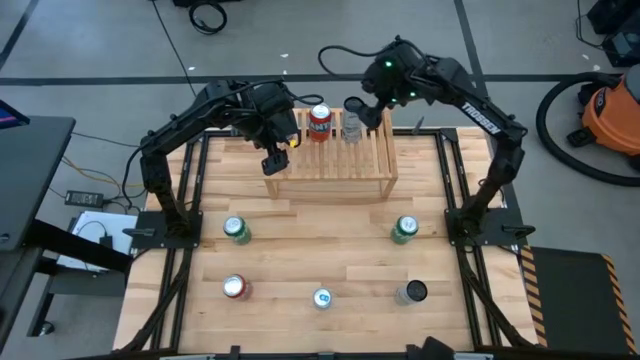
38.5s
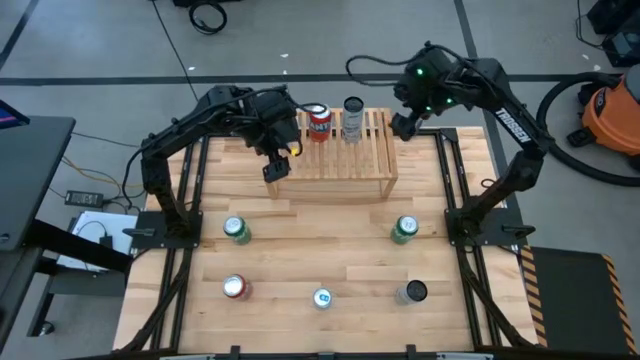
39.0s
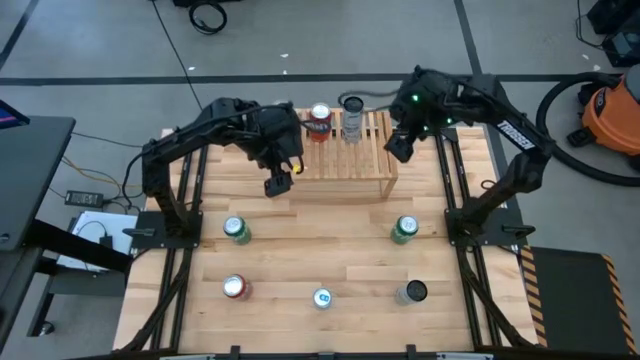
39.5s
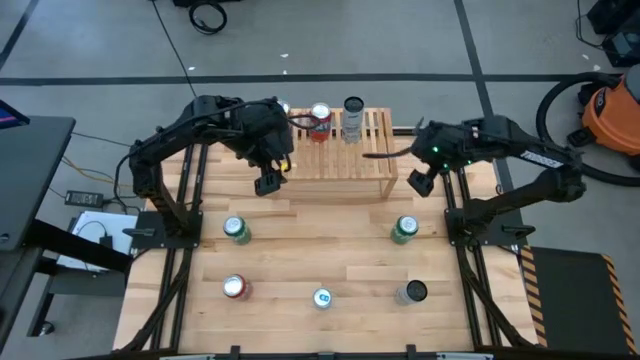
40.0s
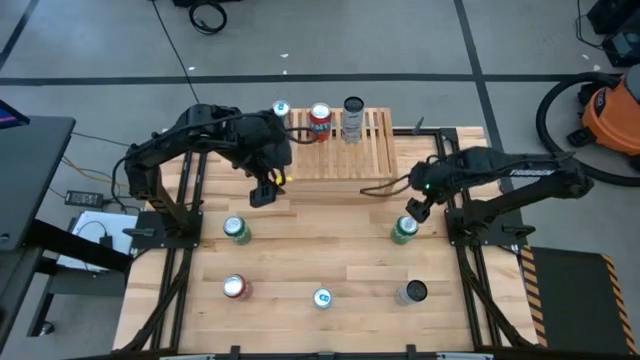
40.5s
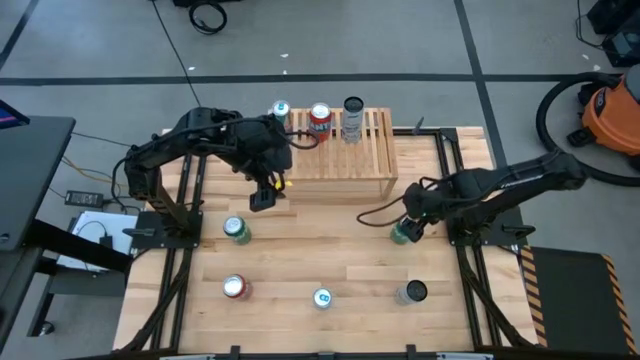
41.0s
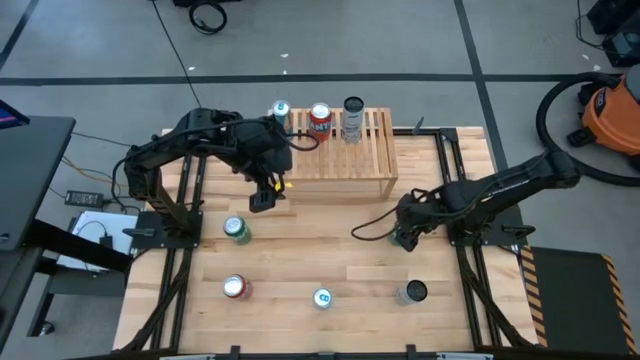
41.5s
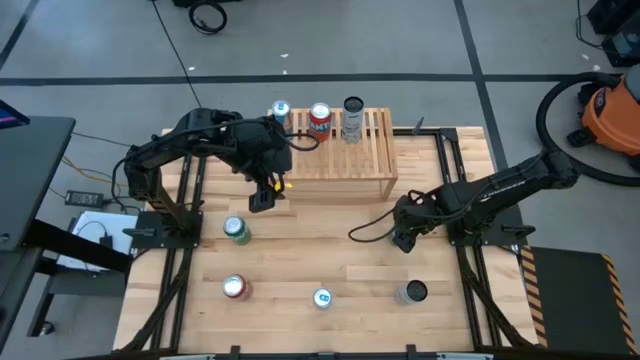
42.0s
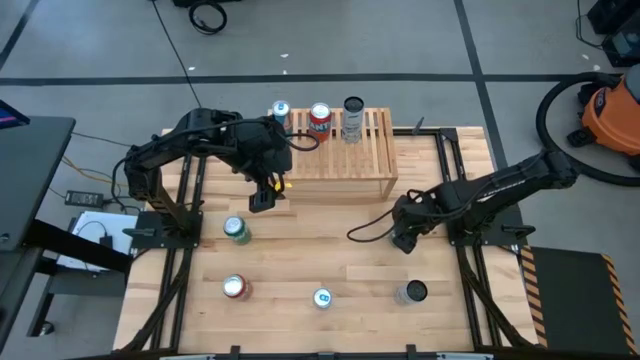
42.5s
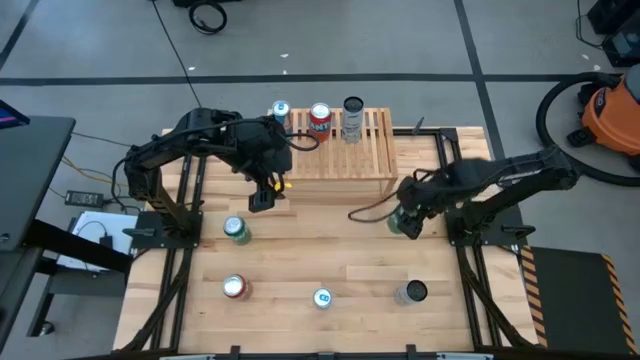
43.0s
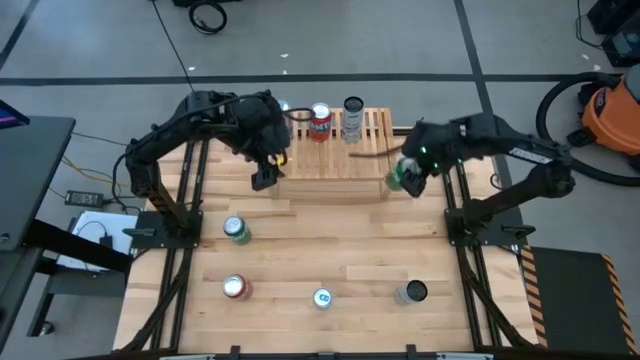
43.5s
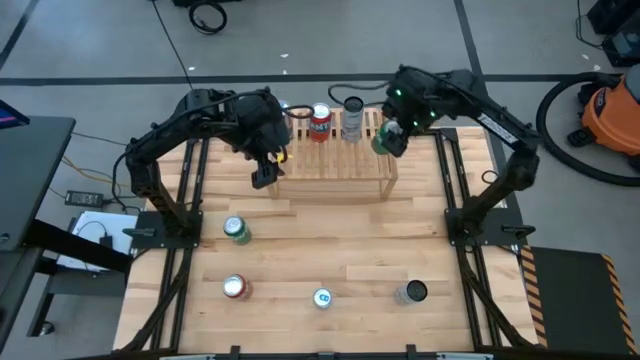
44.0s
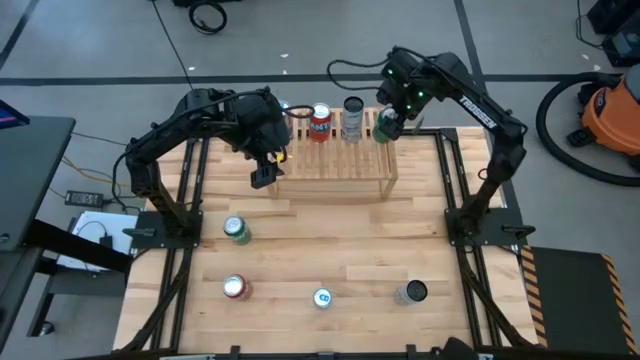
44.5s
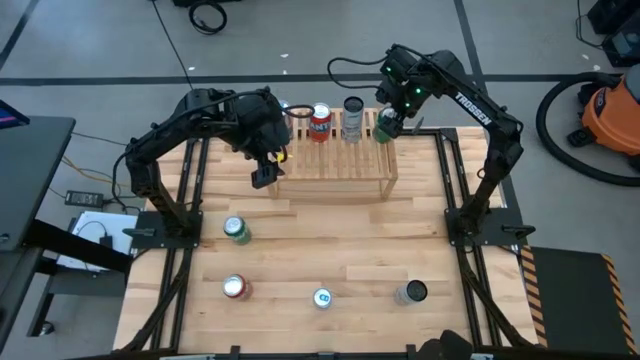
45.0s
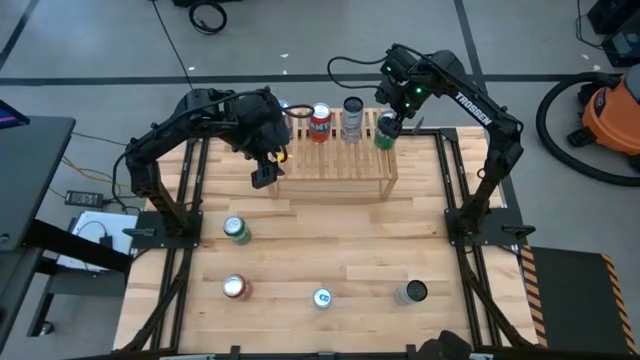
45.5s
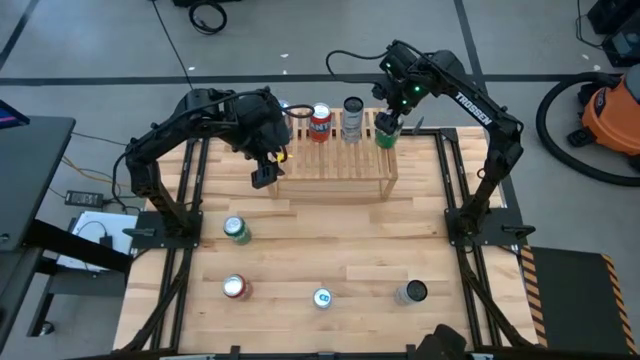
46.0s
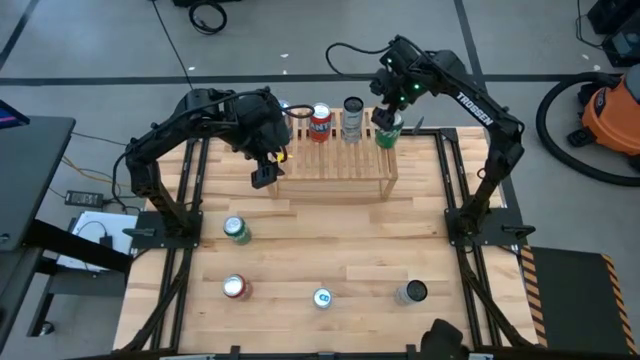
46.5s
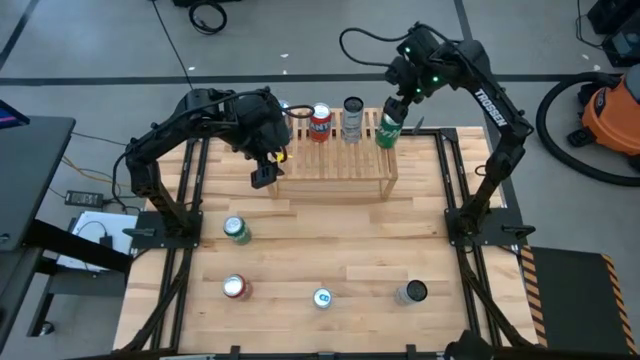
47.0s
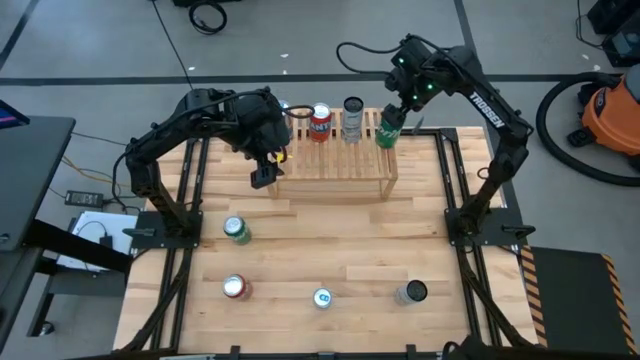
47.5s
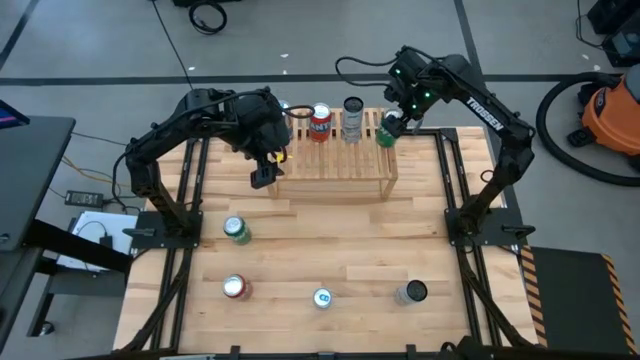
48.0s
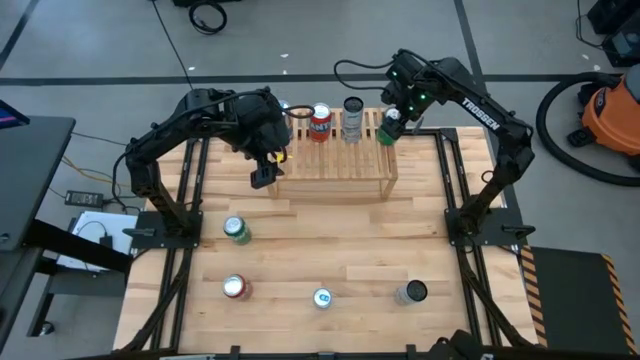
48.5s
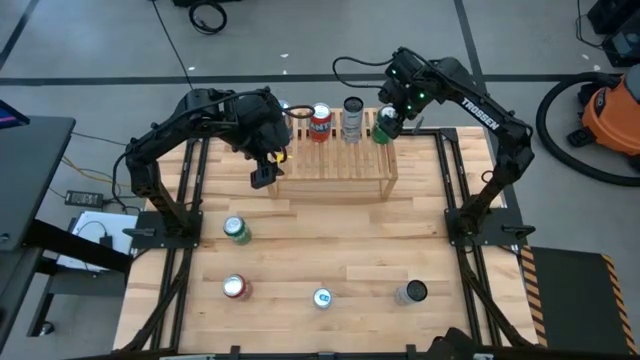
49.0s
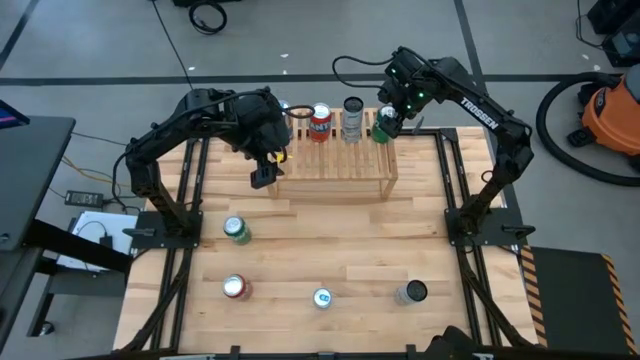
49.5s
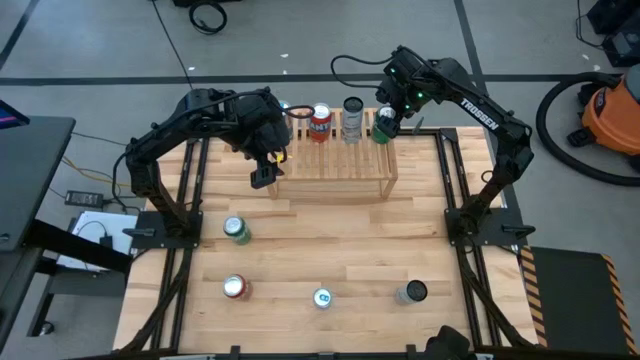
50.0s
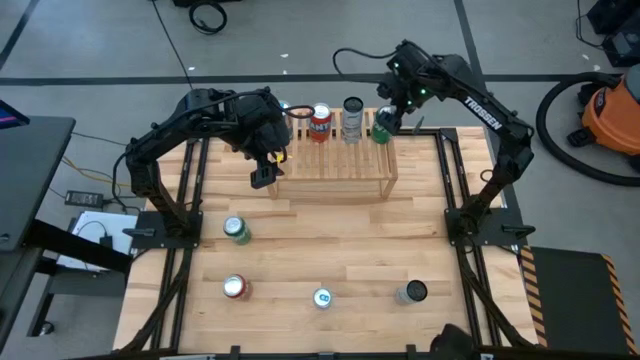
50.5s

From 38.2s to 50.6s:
Task: Place canned beverage on shelf
Put the right green soda can on the shelf

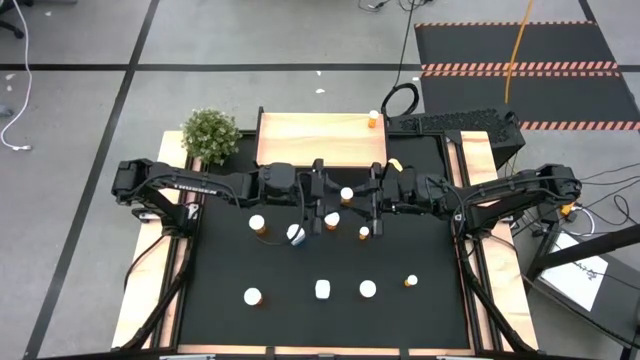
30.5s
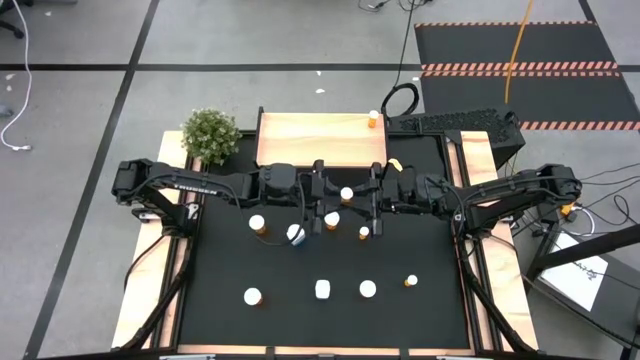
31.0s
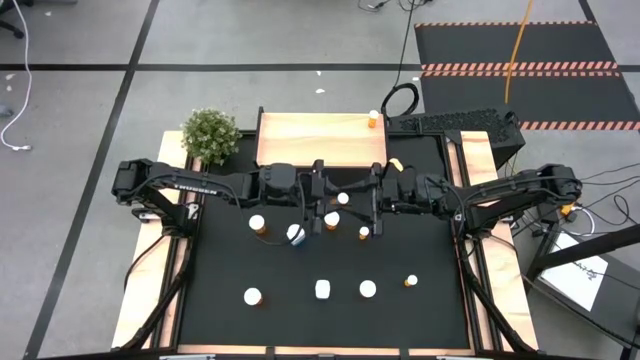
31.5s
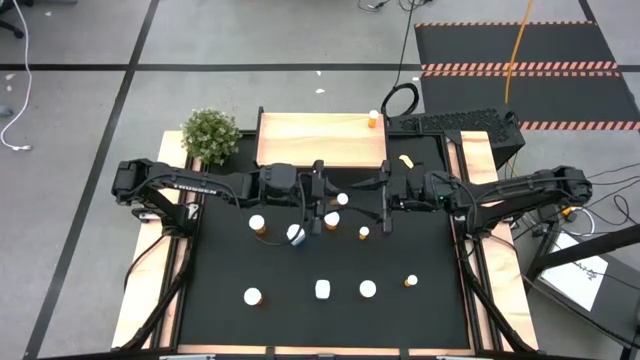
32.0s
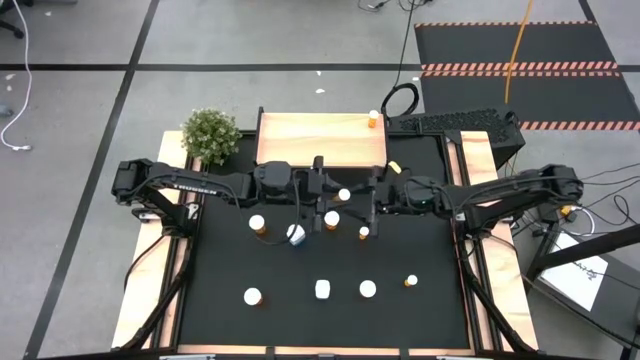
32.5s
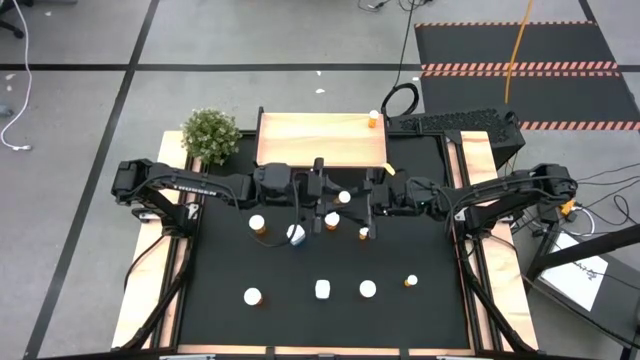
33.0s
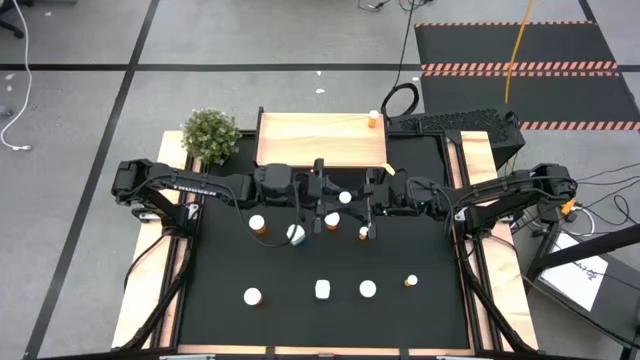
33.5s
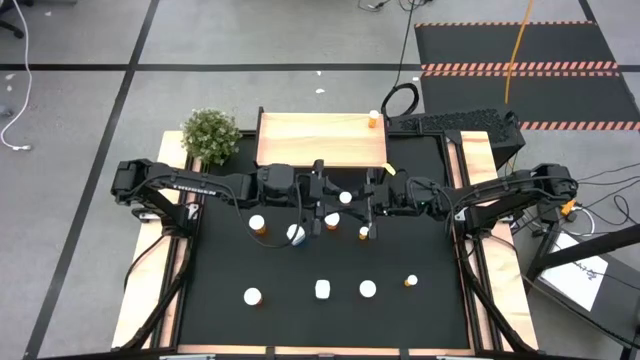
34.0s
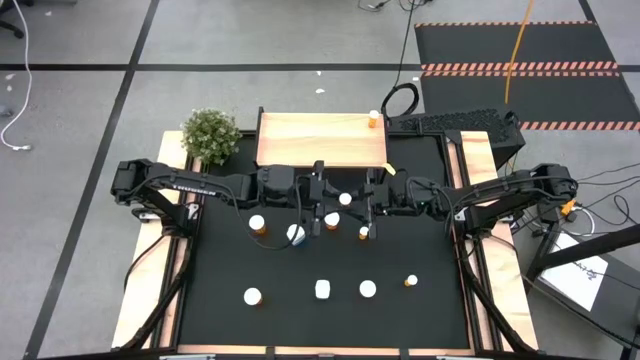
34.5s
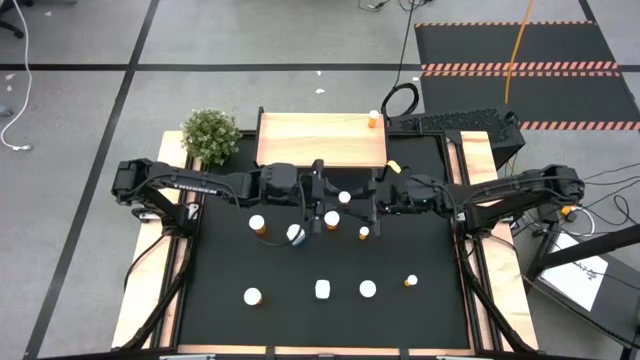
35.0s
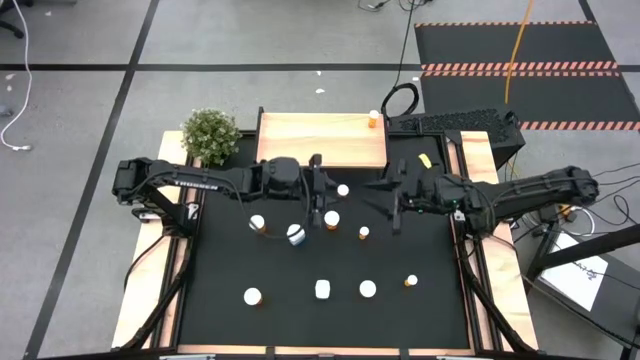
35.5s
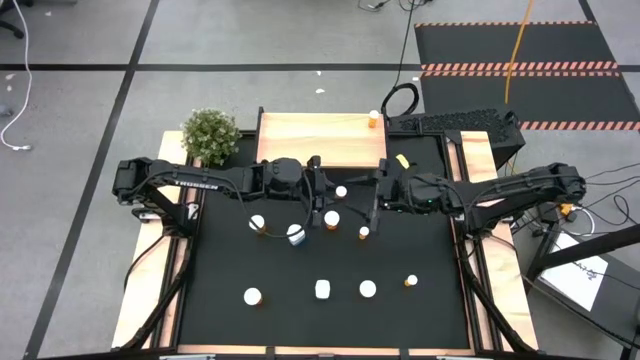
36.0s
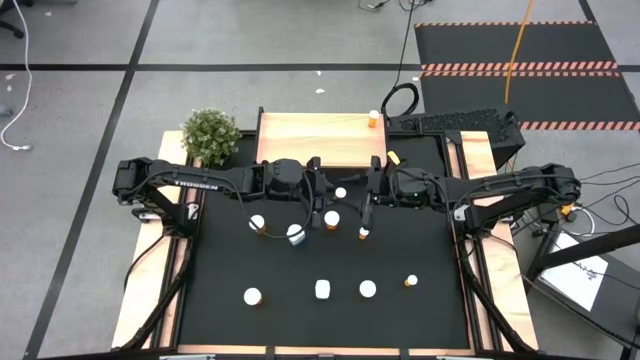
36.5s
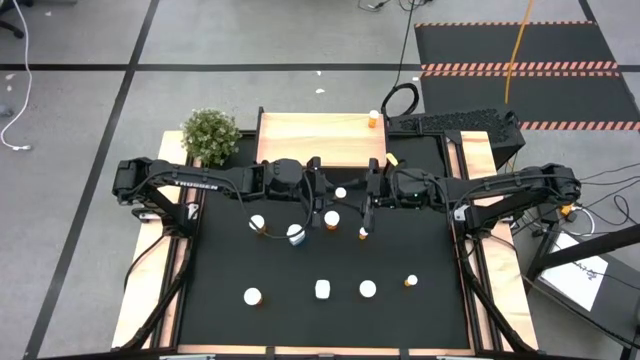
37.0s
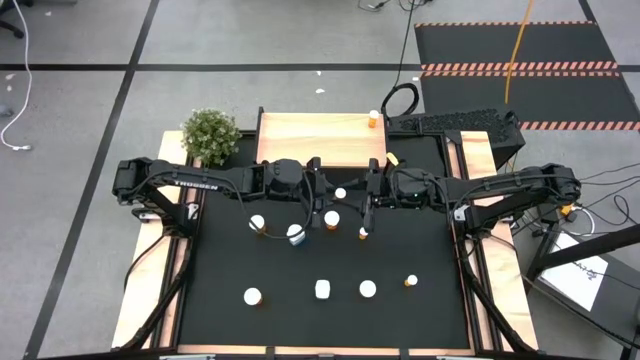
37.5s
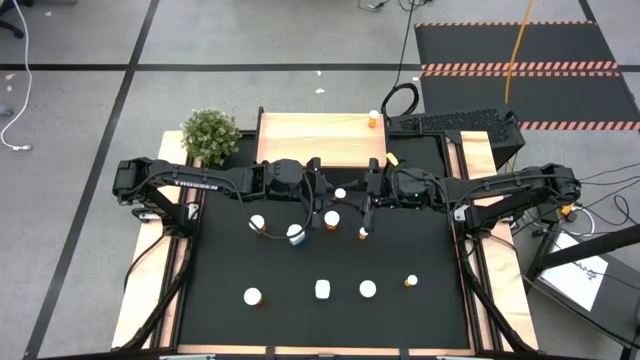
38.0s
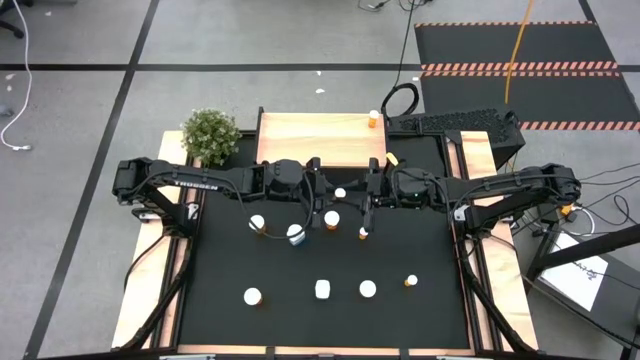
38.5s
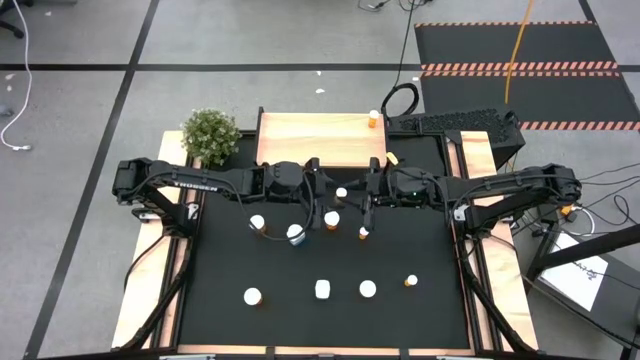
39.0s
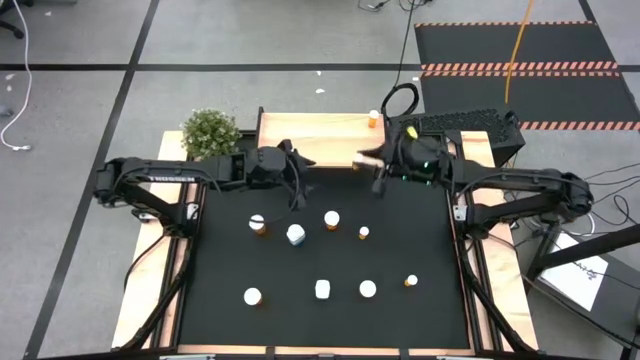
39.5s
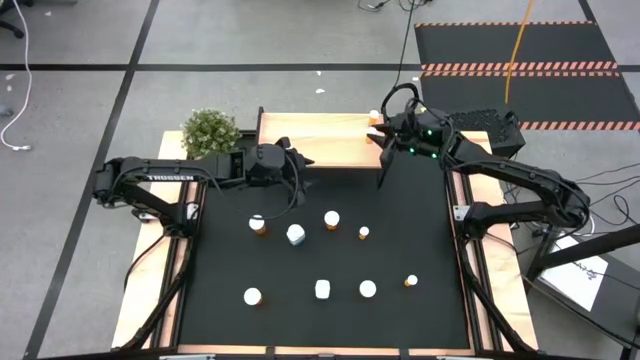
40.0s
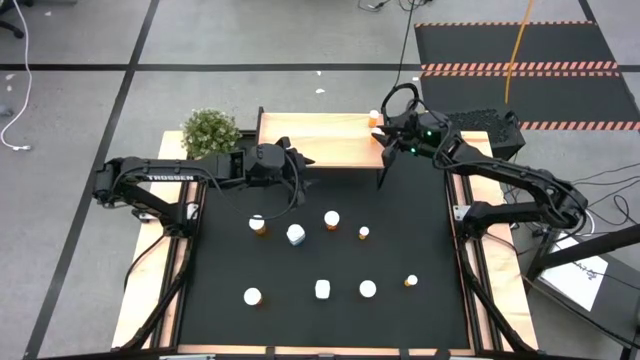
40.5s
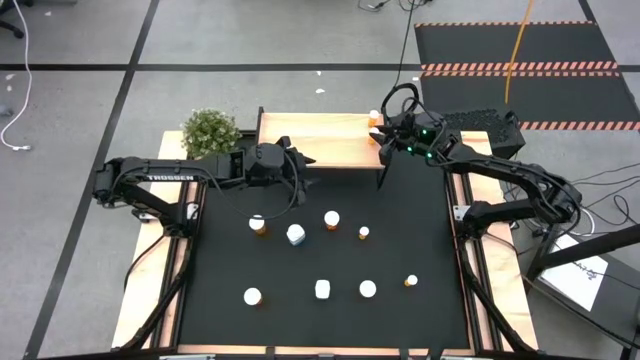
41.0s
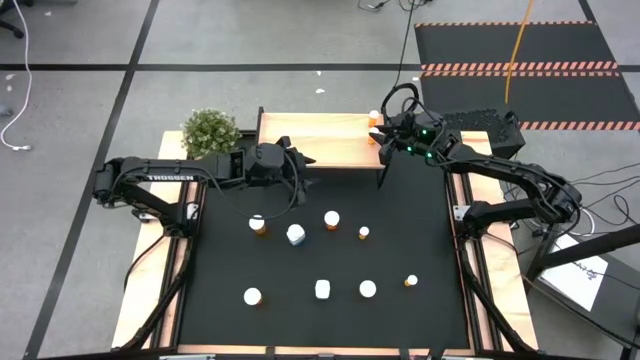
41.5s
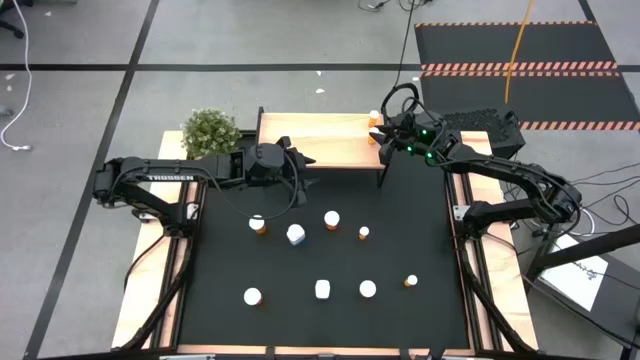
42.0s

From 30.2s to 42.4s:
Task: Pick and place medicine bottles onto shelf by color
Put the small orange pill bottle on the shelf aligned with the other small orange pill bottle
